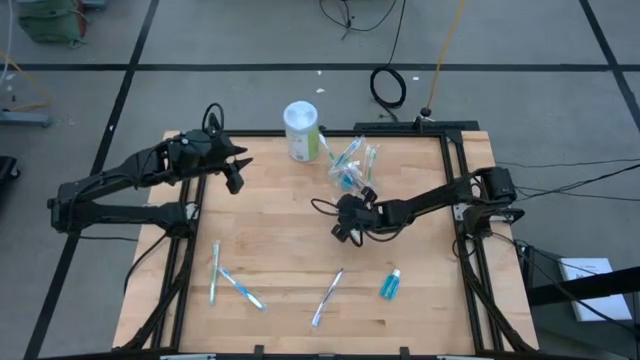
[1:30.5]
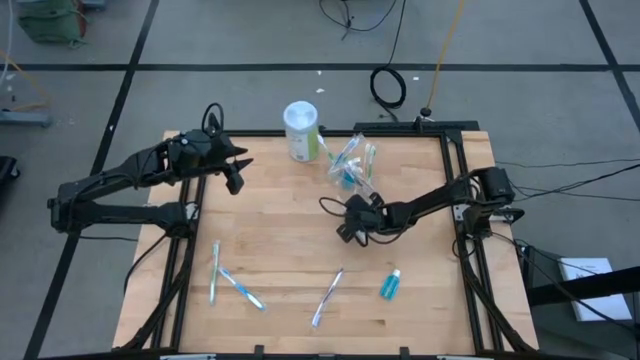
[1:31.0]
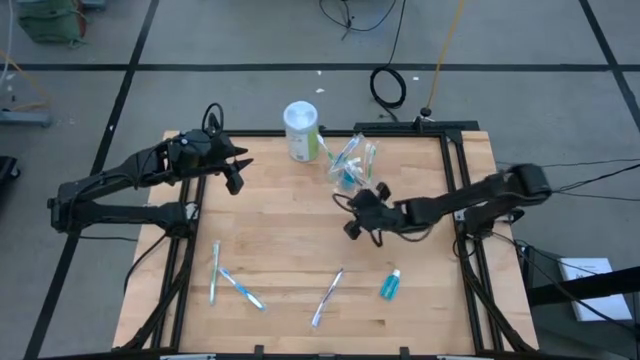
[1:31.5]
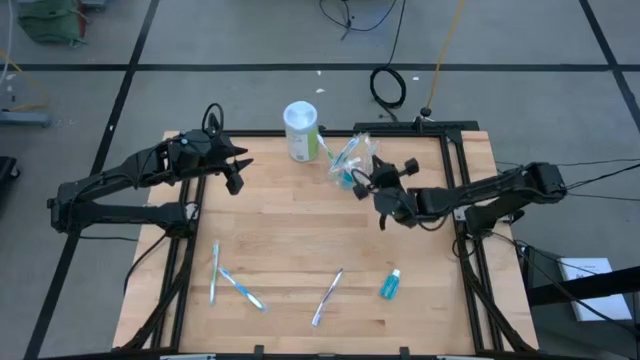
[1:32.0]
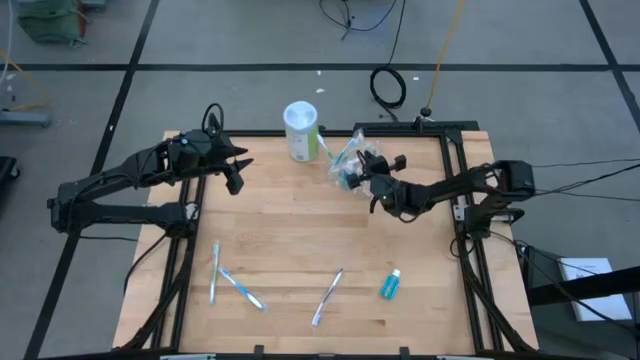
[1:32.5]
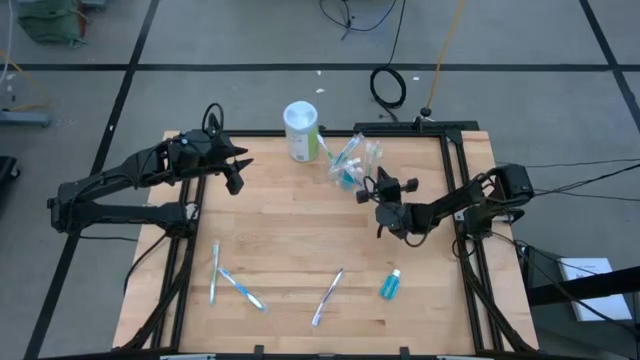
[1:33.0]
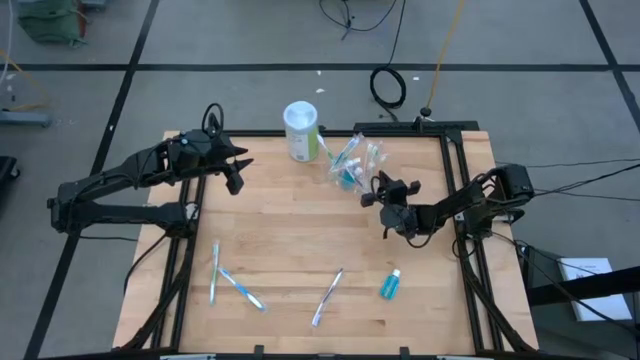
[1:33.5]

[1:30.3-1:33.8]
Task: Pick & Place toothbrushing station
Put the orange toothbrush into the transparent organizer

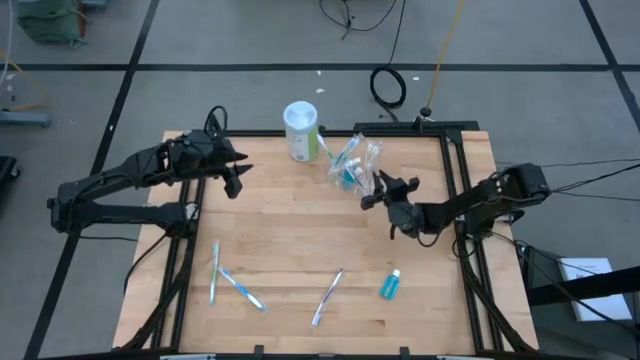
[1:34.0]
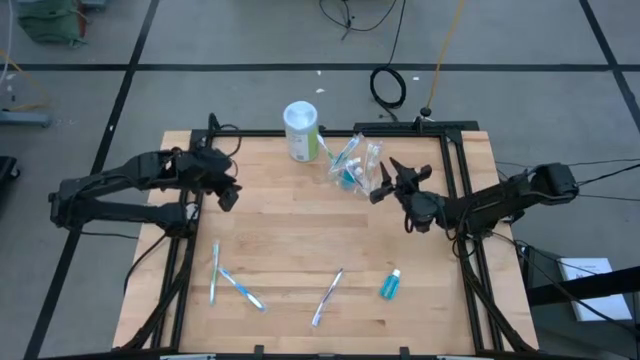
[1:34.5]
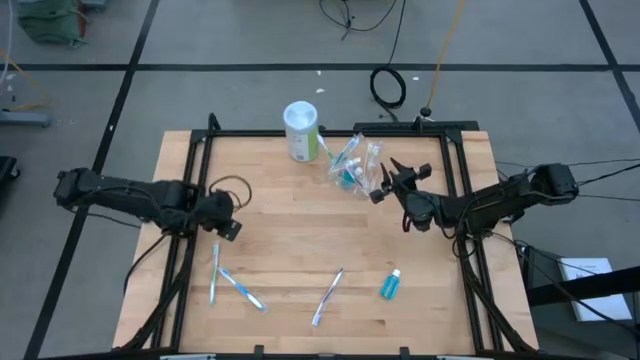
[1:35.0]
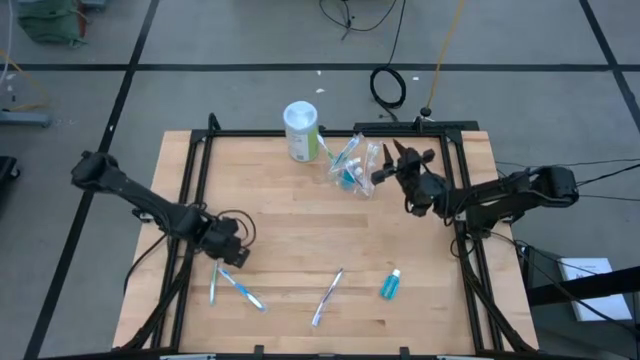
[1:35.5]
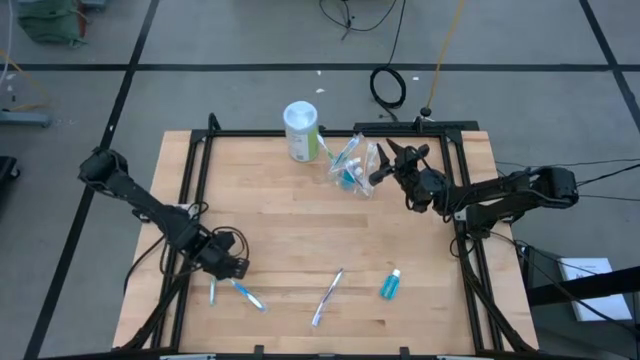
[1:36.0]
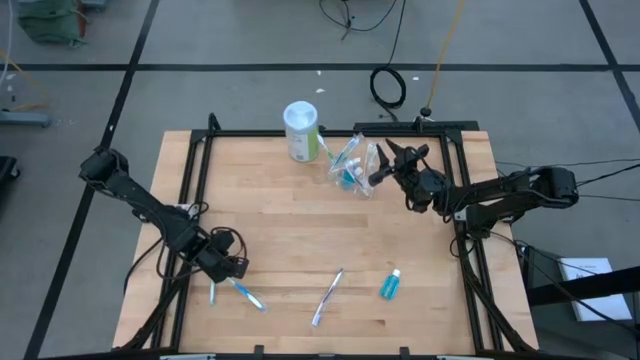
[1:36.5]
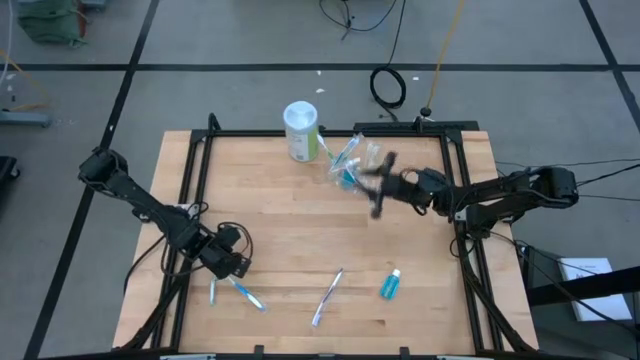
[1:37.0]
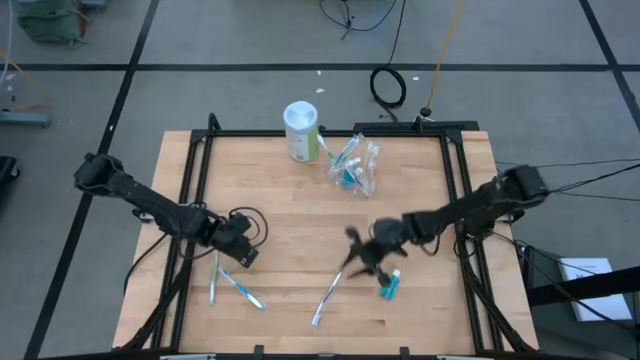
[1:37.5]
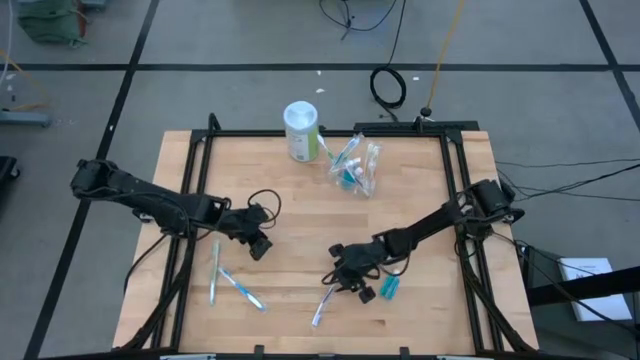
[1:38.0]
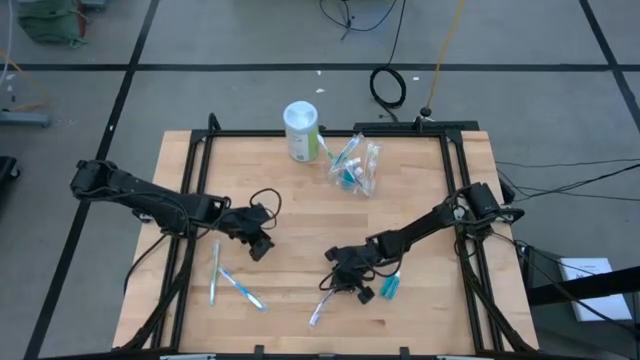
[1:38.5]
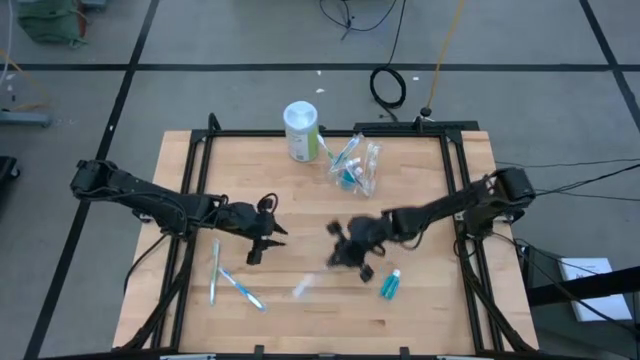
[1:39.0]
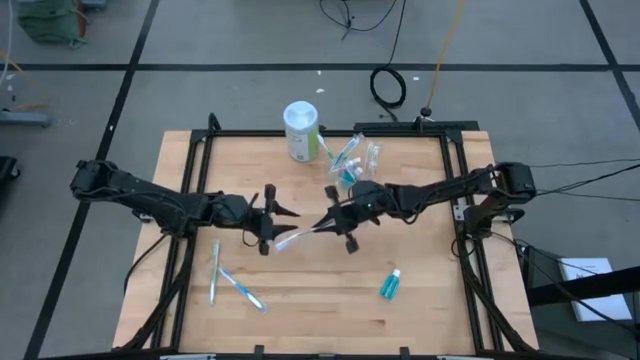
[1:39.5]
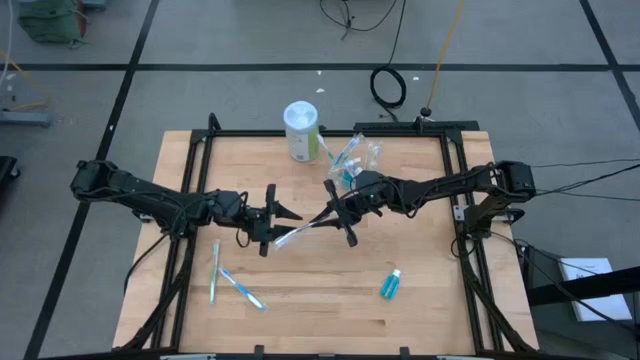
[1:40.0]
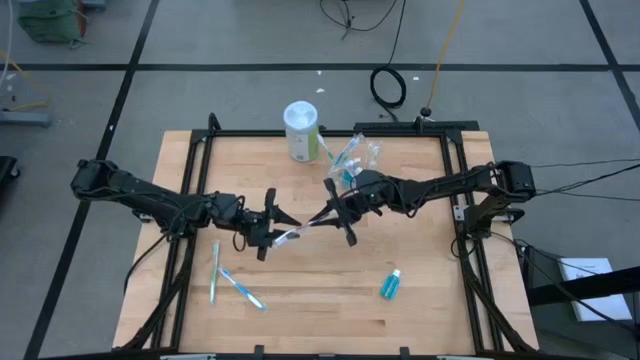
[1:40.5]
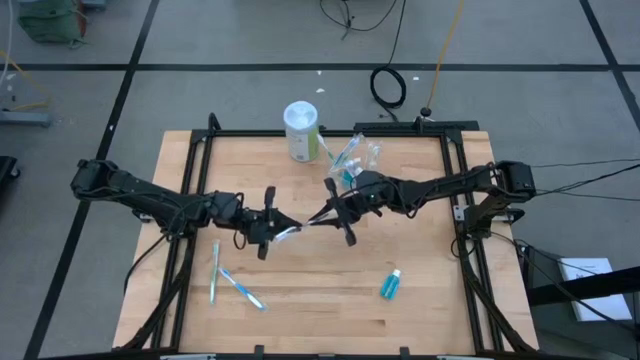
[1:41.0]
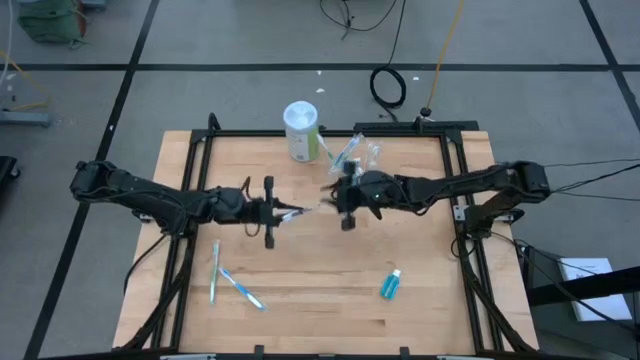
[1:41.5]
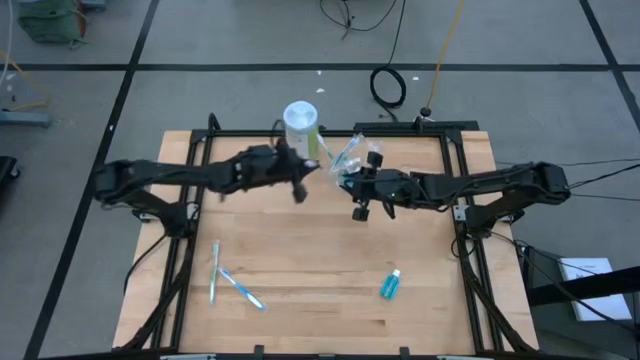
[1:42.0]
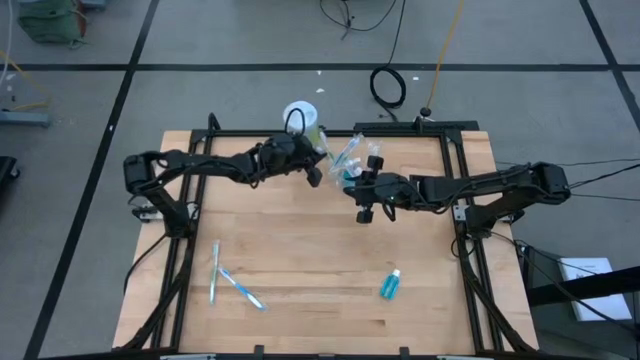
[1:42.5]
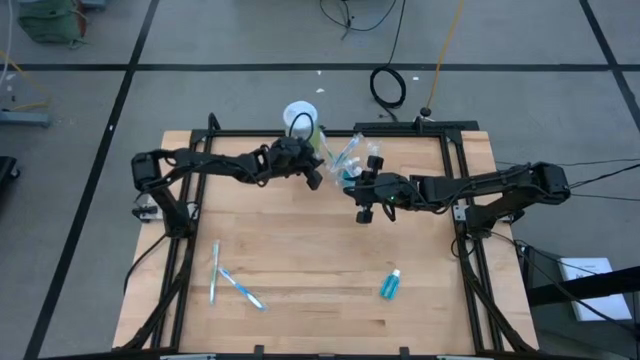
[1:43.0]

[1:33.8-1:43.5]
Put the purple toothbrush into the transparent organizer

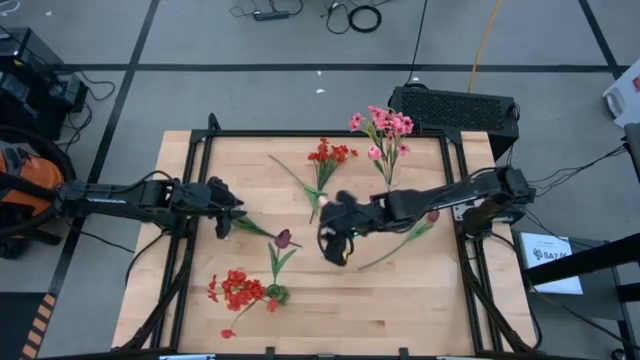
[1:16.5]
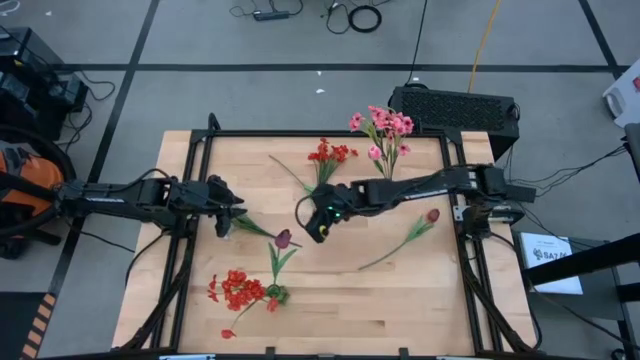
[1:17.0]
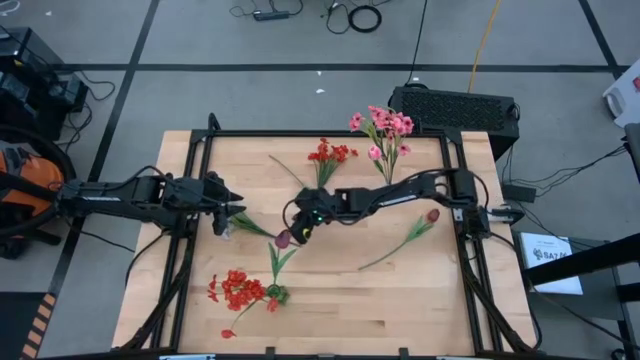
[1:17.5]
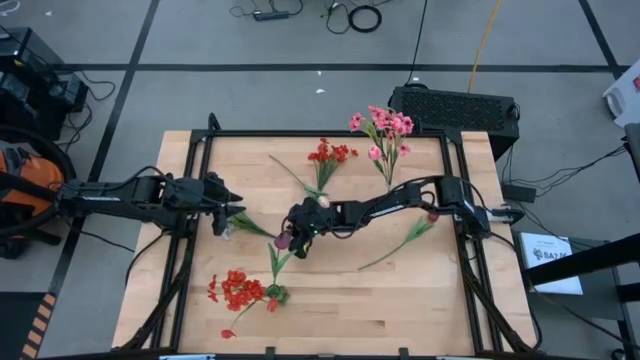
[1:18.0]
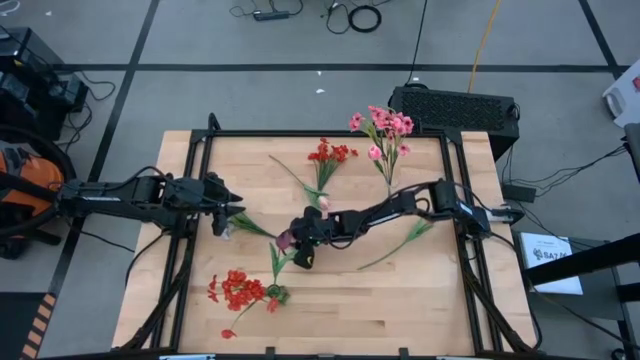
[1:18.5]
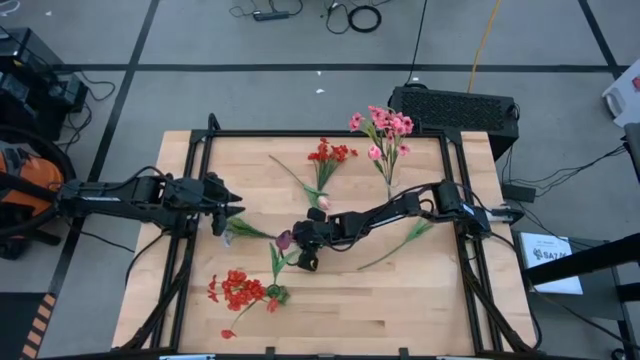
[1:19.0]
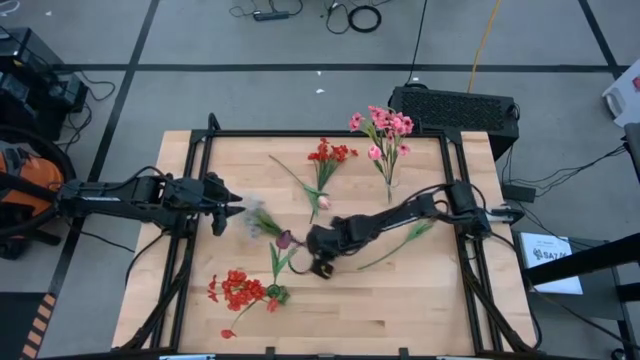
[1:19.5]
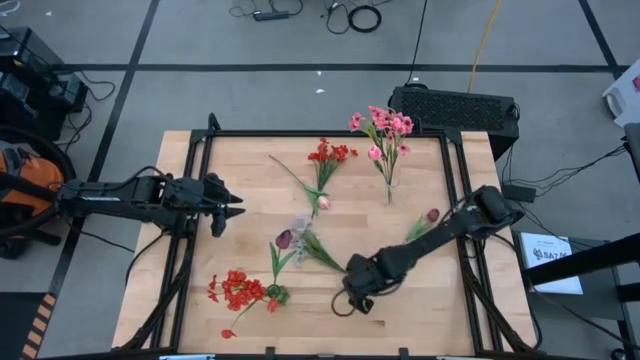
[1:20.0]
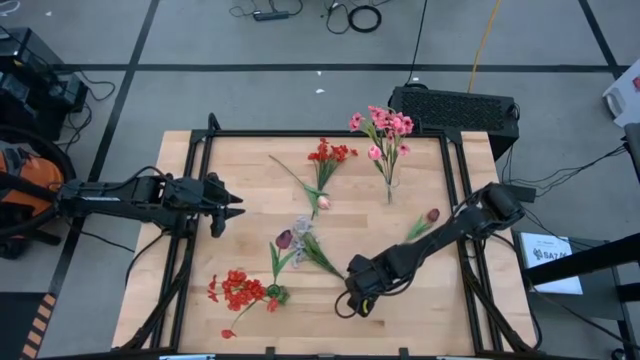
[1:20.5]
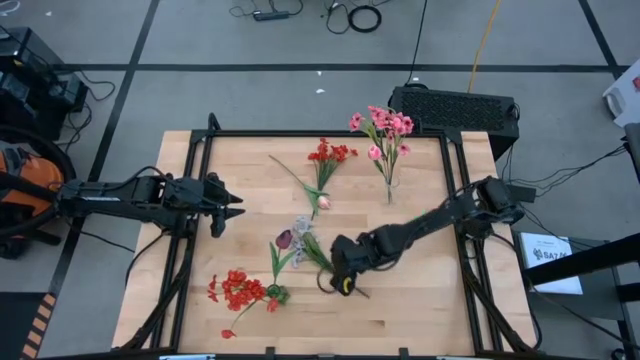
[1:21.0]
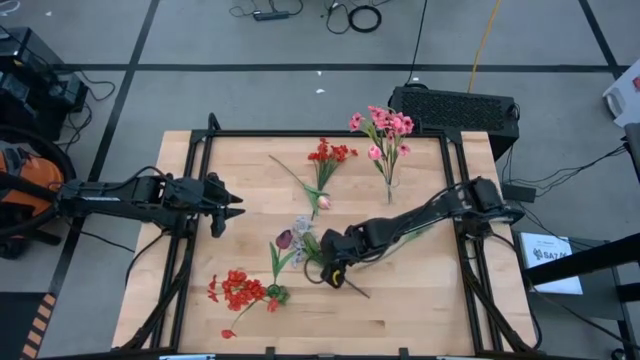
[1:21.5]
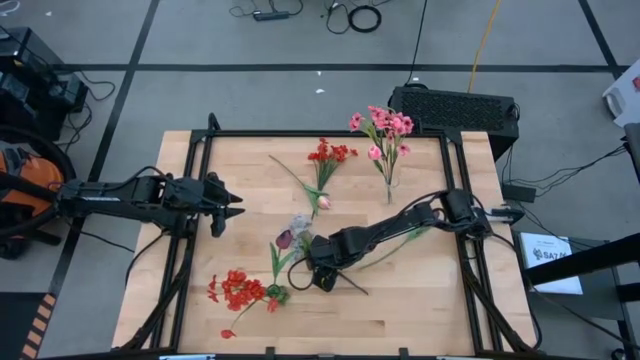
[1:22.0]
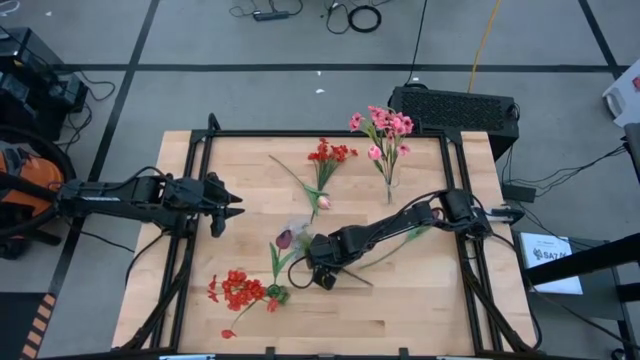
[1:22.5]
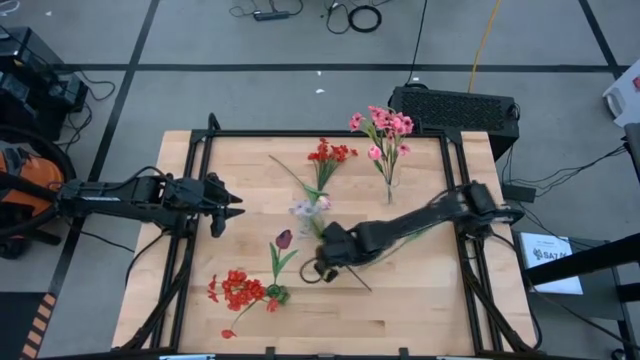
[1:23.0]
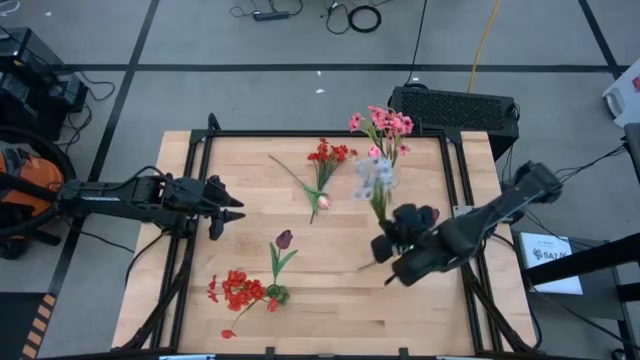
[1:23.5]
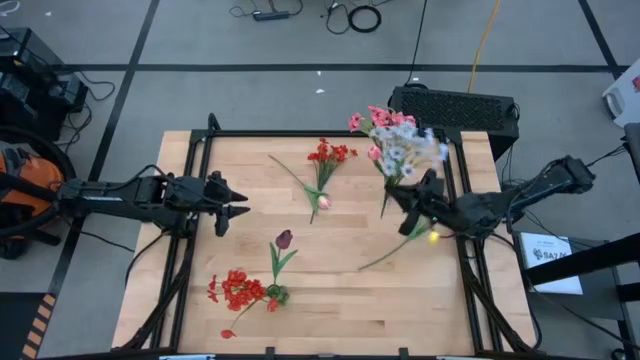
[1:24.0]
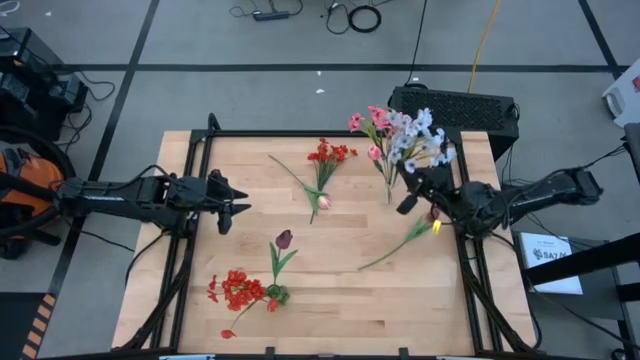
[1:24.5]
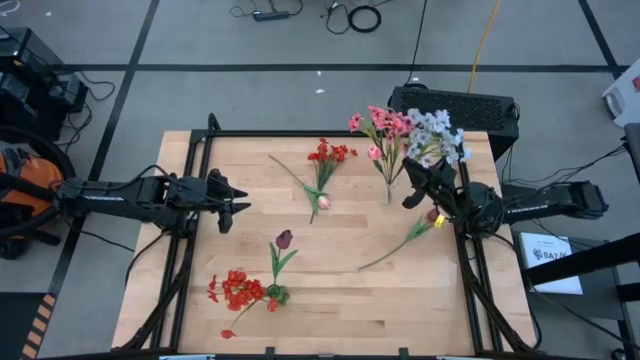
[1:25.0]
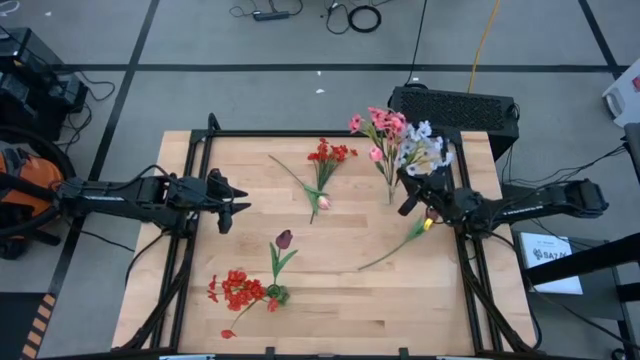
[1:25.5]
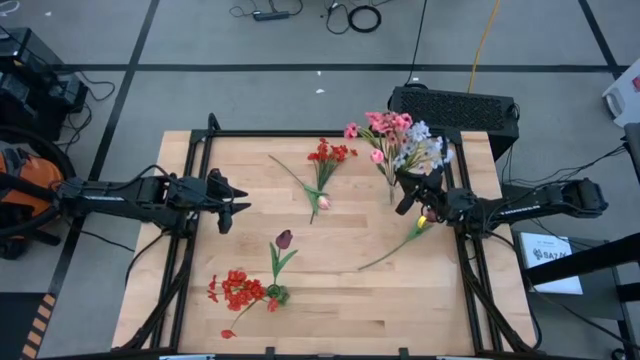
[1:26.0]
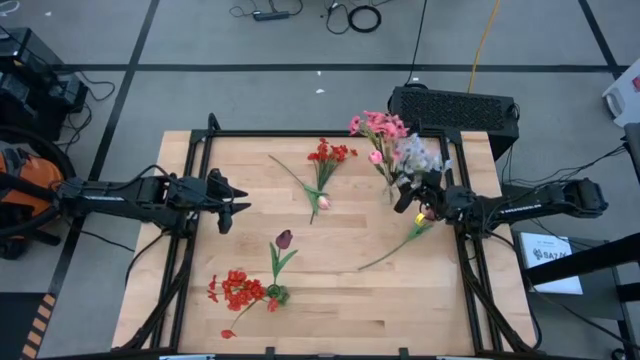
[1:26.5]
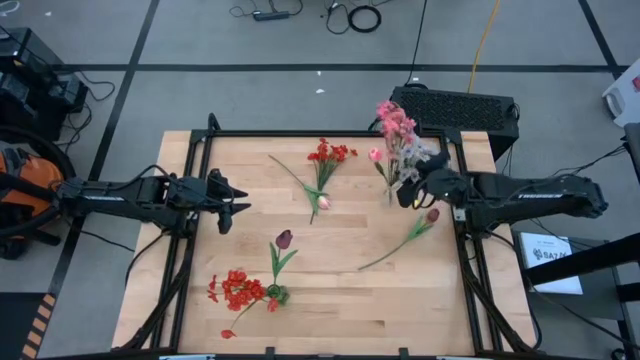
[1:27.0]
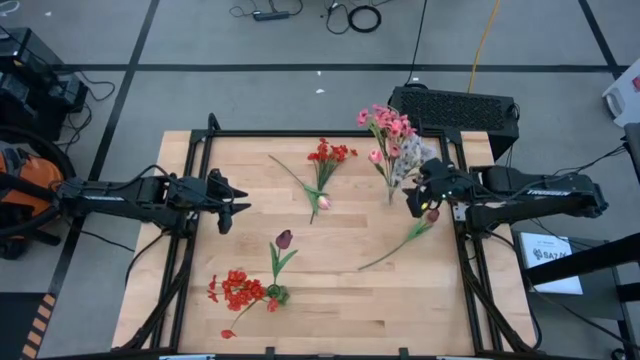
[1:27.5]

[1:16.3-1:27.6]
Task: Sort flowers into vase by color
Put the white flowers into the transparent vase
